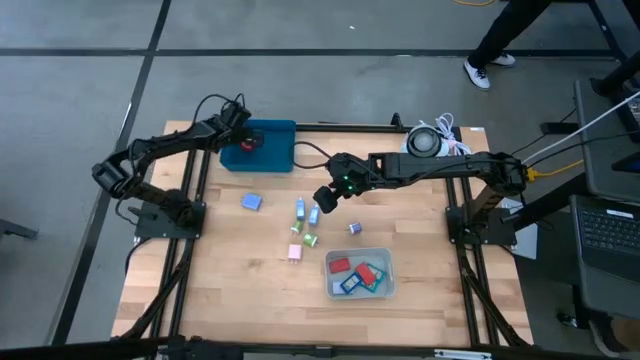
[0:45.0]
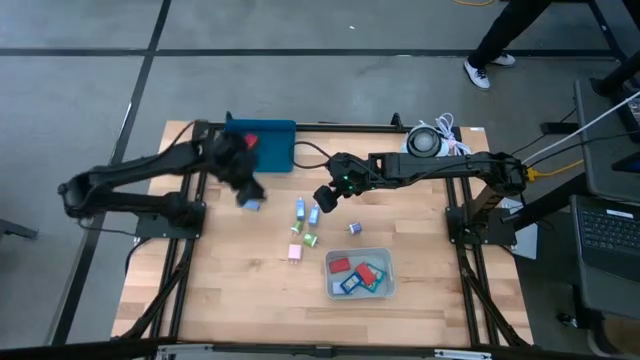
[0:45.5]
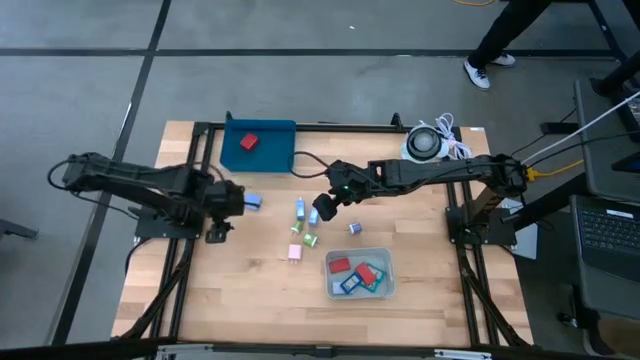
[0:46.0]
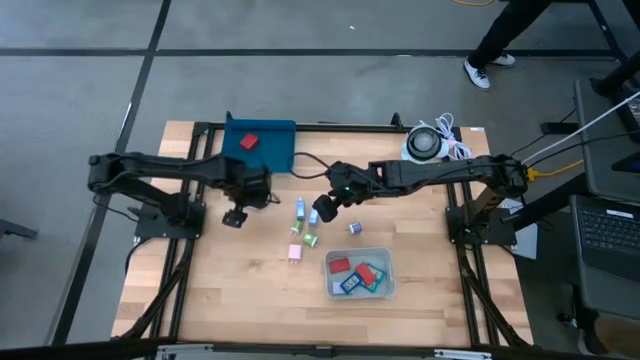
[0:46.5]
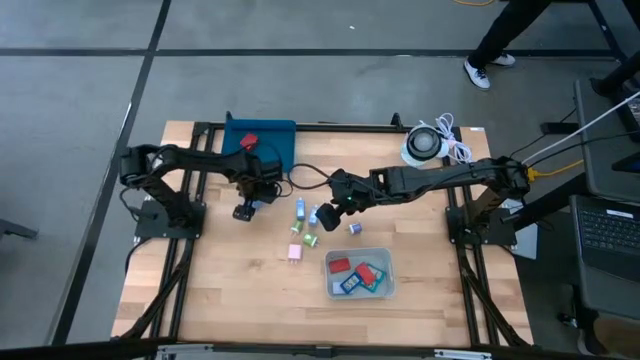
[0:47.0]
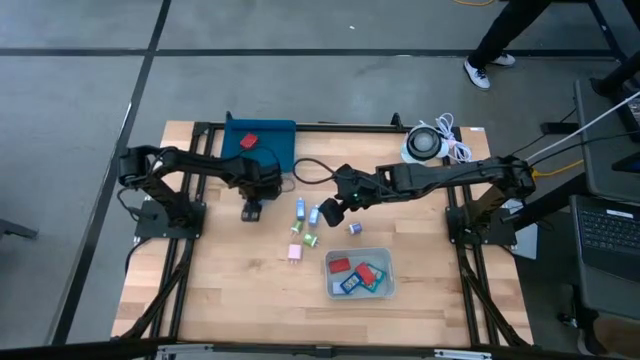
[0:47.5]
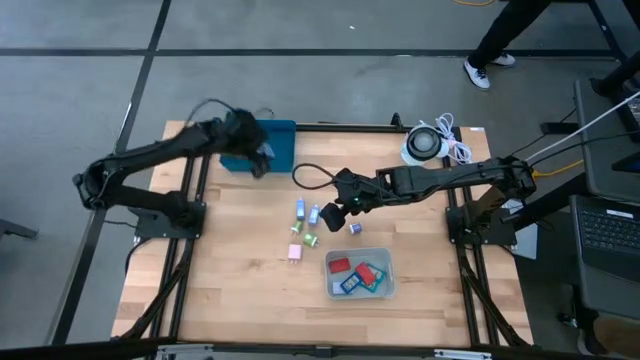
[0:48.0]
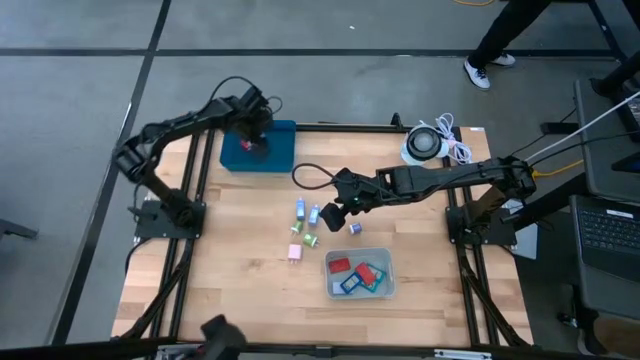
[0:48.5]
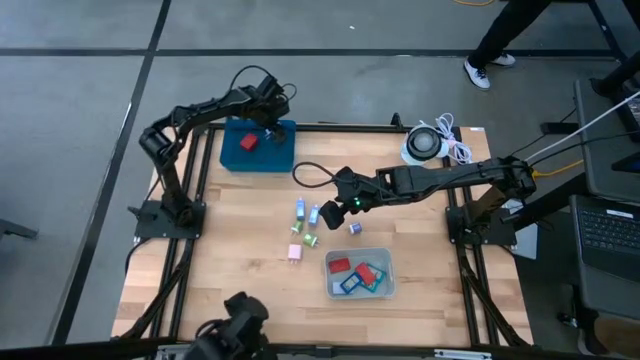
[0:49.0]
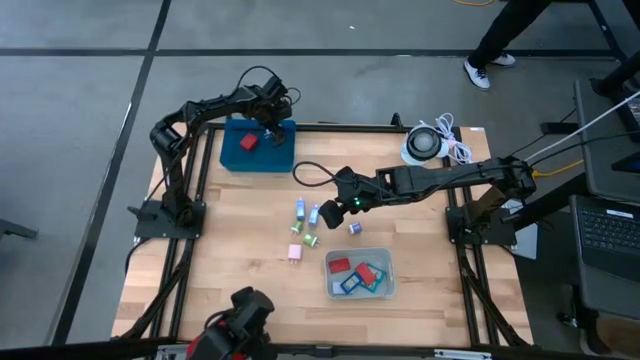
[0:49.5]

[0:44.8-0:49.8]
Task: Pick & Place Office items
Put the left blue charger adapter into the blue bin

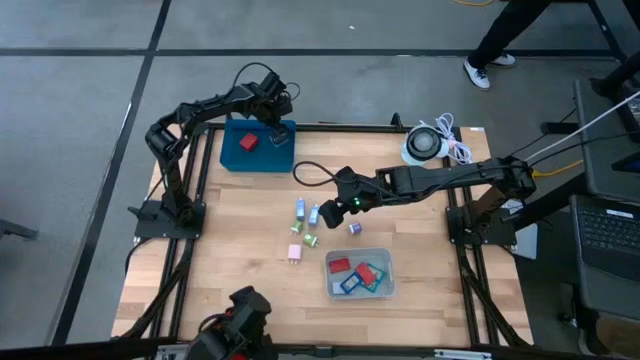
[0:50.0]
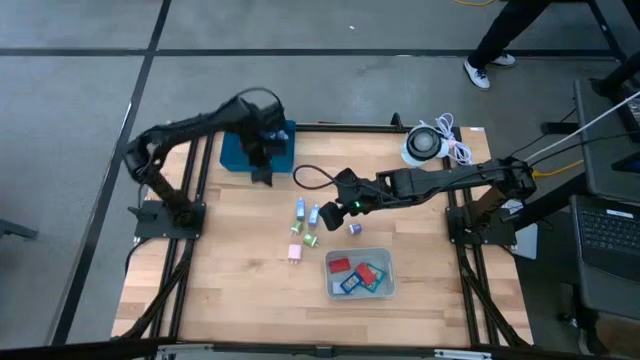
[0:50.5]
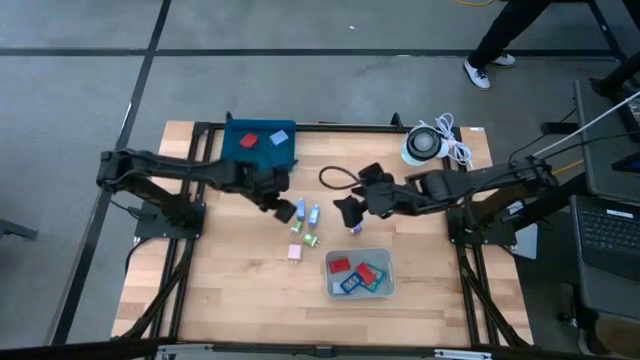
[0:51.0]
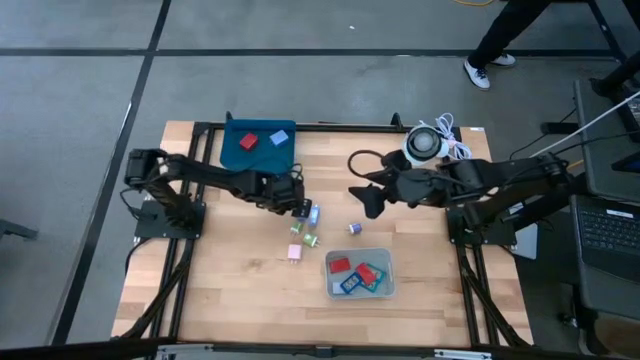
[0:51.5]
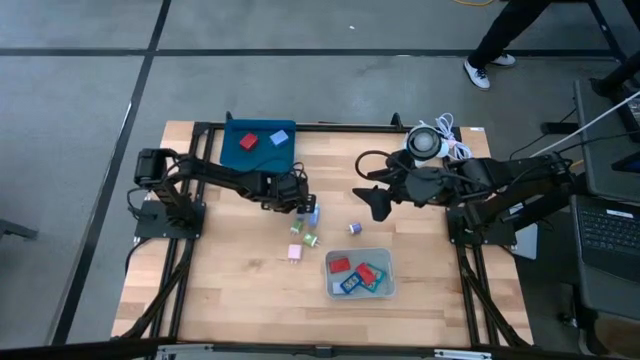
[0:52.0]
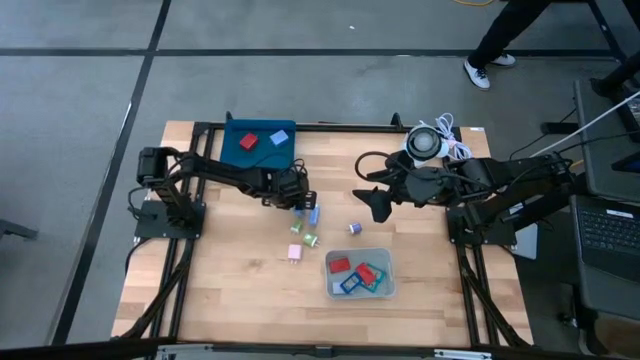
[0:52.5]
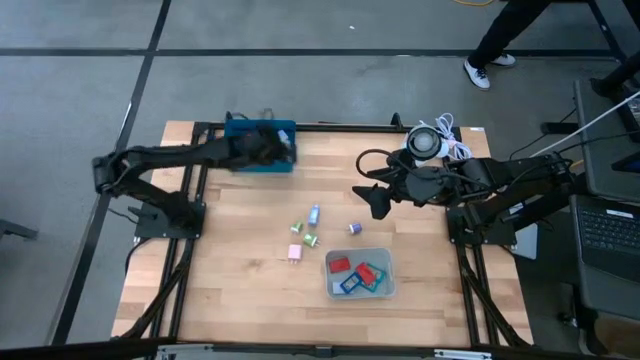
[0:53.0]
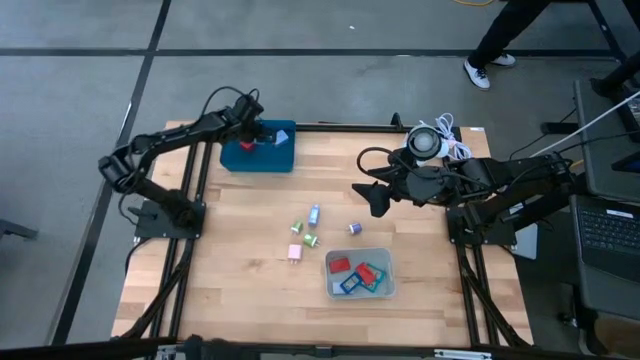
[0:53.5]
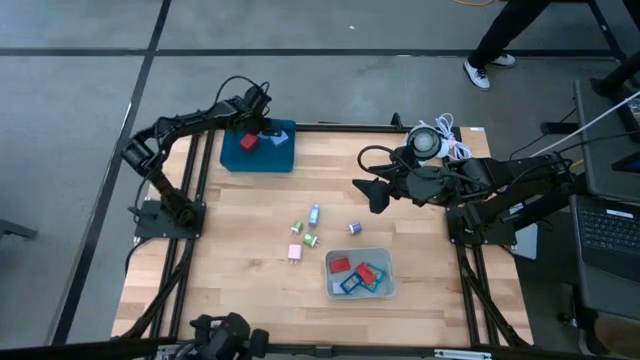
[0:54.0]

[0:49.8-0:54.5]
Put the left blue charger adapter into the blue bin

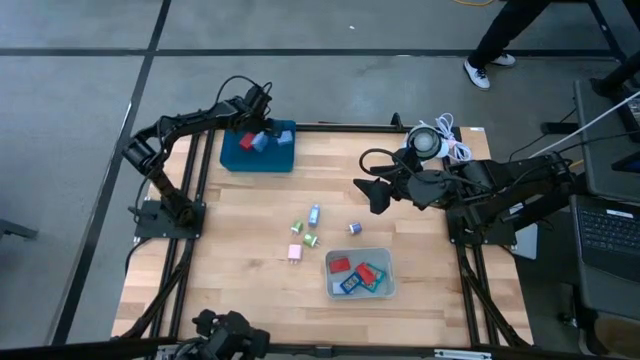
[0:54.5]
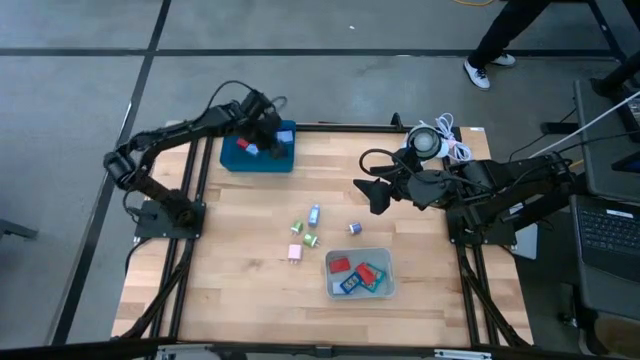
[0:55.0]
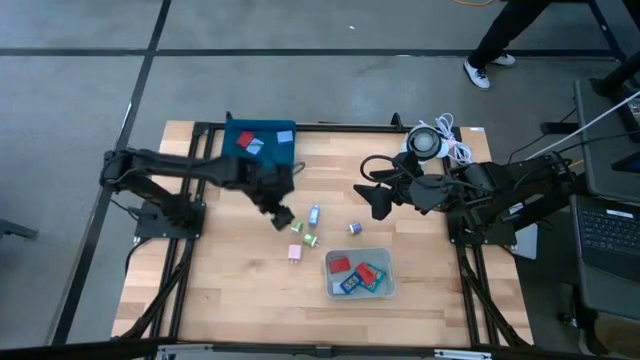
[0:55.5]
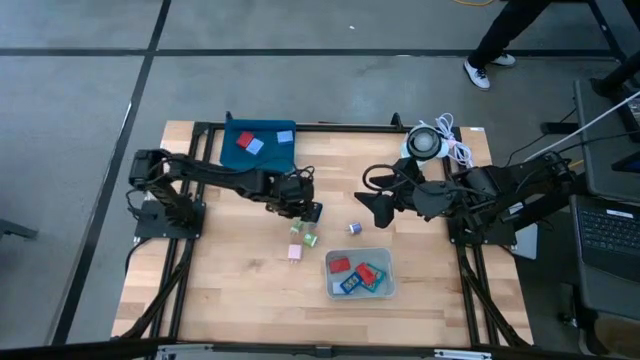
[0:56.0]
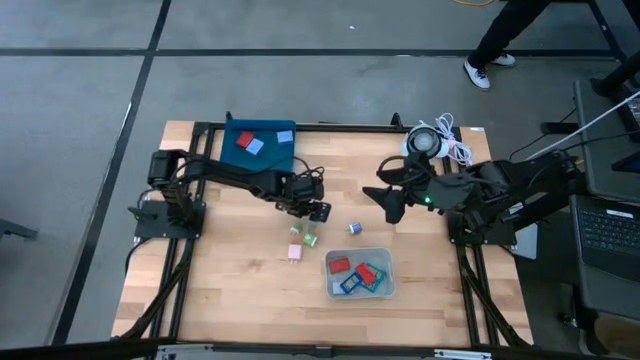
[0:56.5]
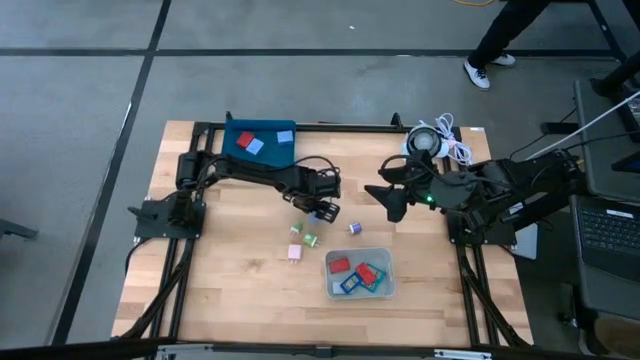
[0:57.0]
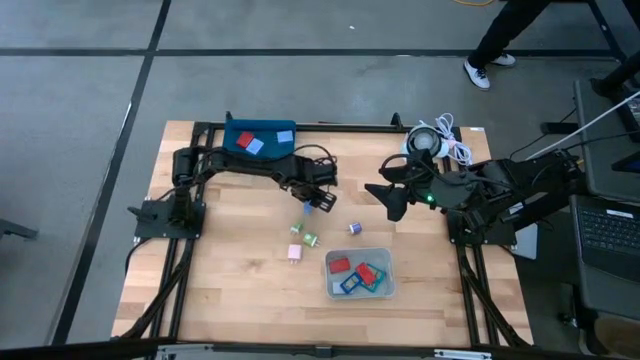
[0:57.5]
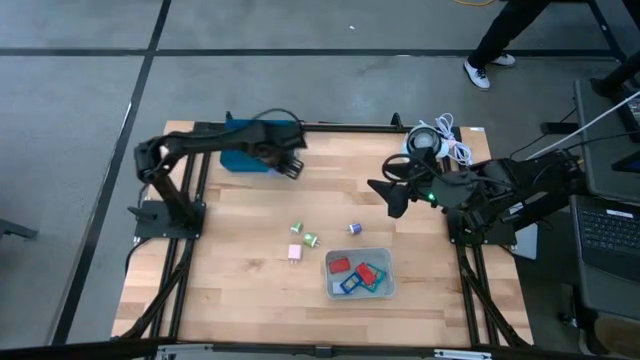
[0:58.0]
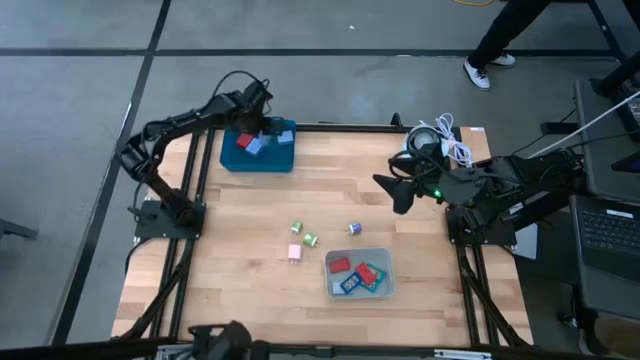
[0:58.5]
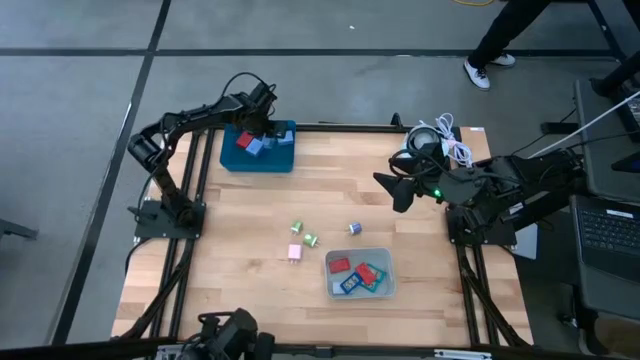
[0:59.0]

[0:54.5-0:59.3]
Put the blue charger adapter into the blue bin

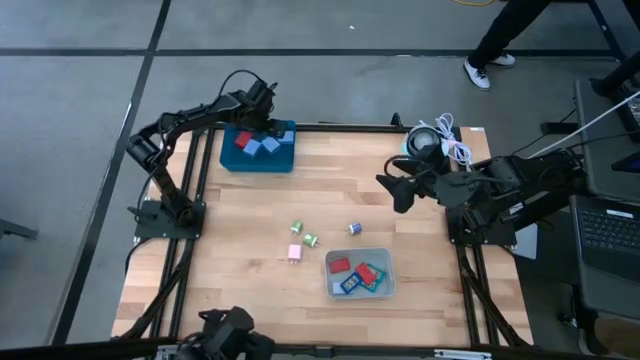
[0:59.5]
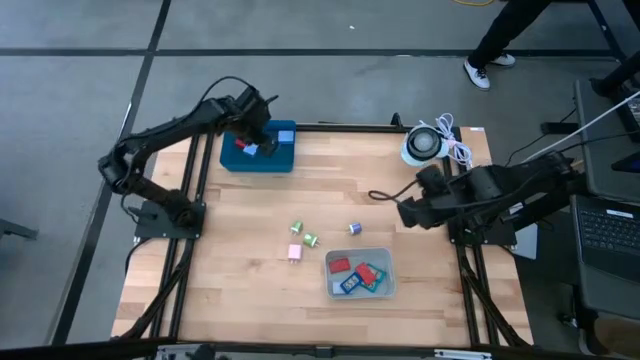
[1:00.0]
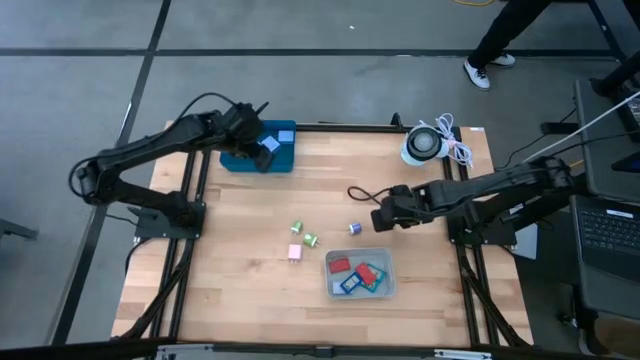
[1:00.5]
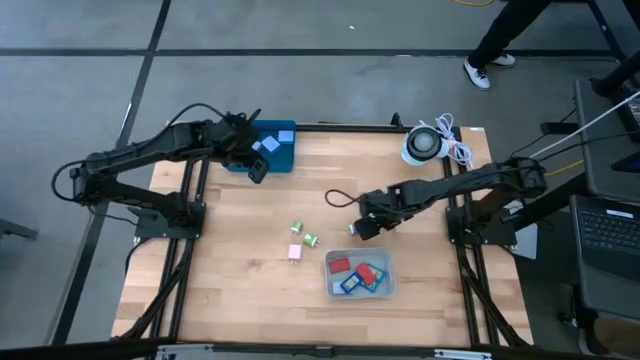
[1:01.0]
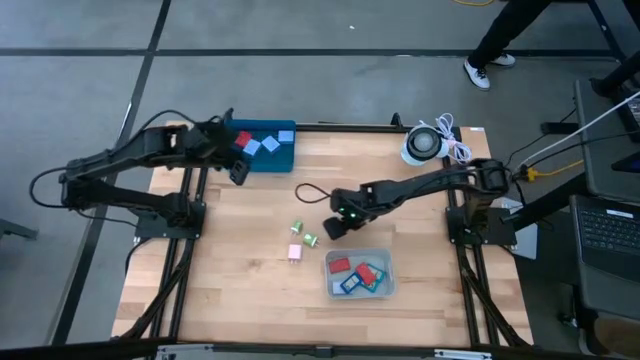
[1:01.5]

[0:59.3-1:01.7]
Adjust the purple charger adapter

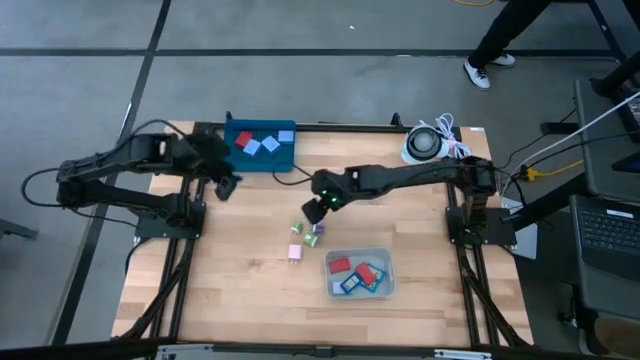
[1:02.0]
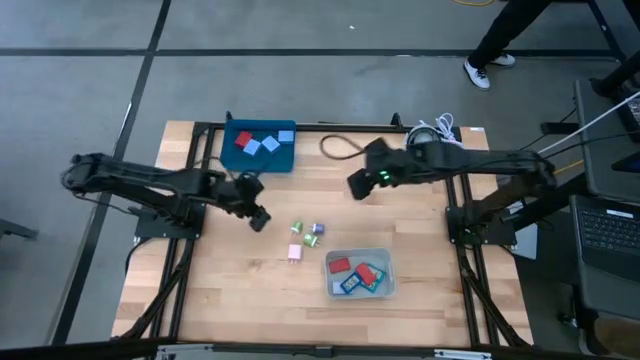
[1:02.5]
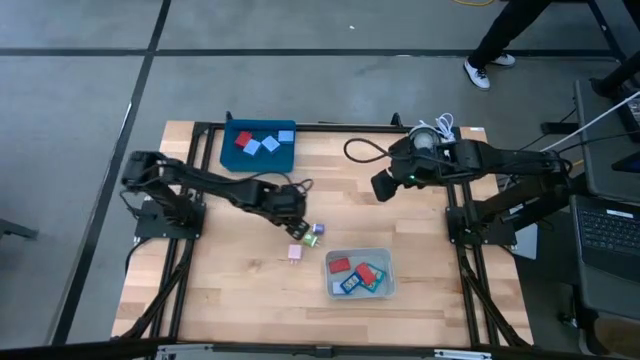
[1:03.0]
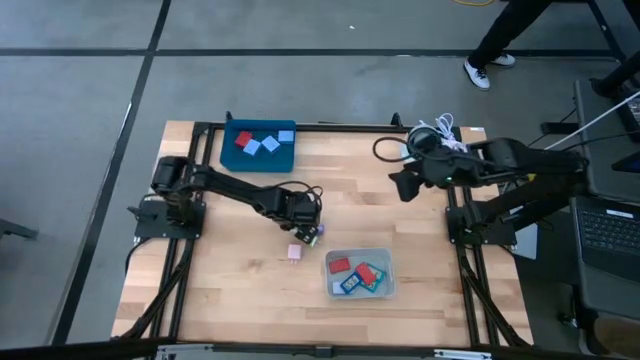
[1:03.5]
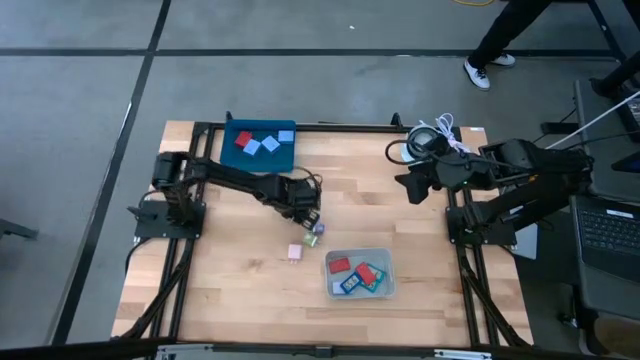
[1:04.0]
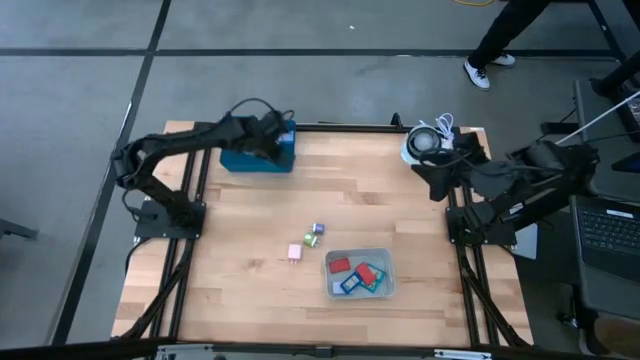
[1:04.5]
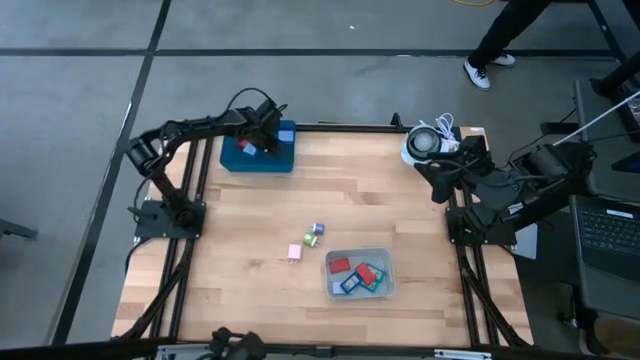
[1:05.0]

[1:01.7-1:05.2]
Put the left green charger adapter into the blue bin

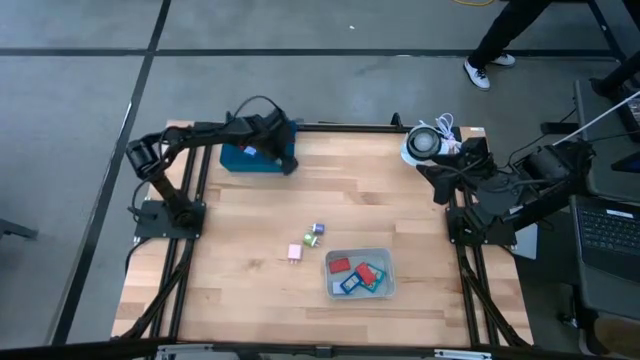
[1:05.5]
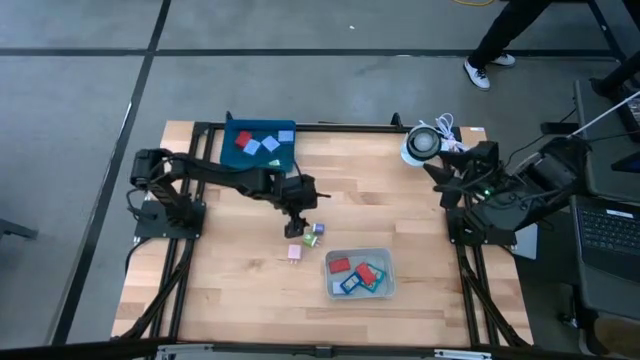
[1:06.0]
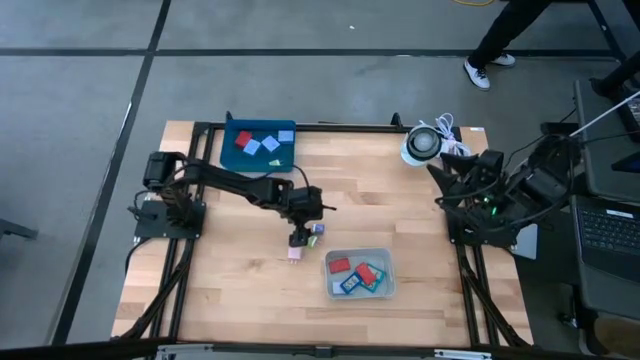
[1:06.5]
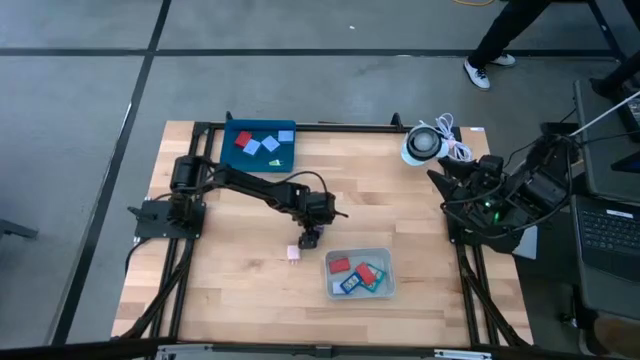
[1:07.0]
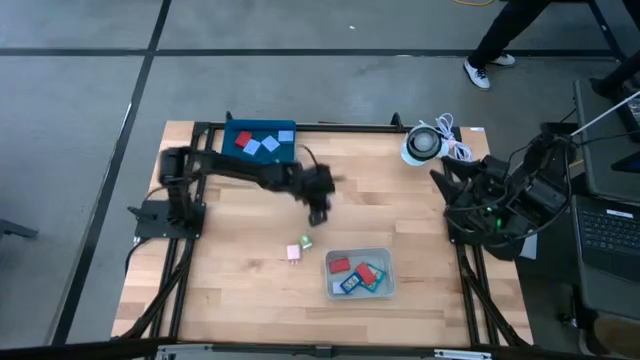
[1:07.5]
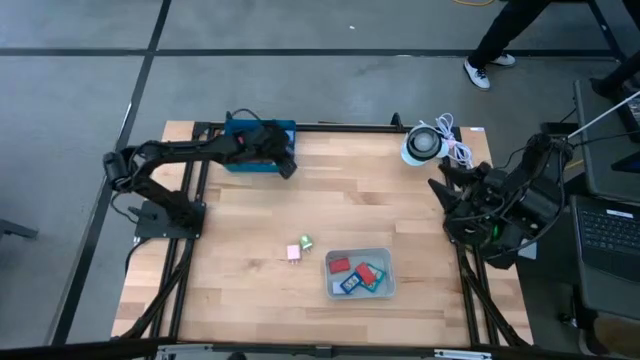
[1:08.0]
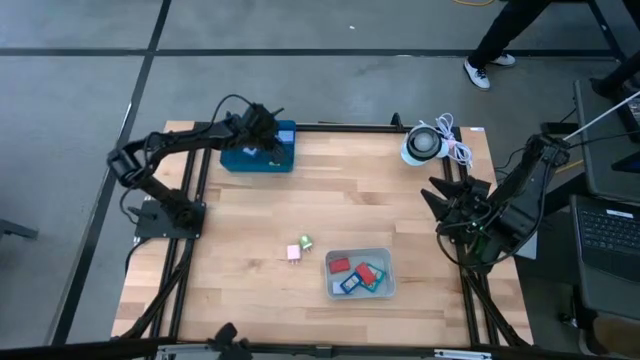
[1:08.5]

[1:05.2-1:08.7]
Put the purple charger adapter into the blue bin
